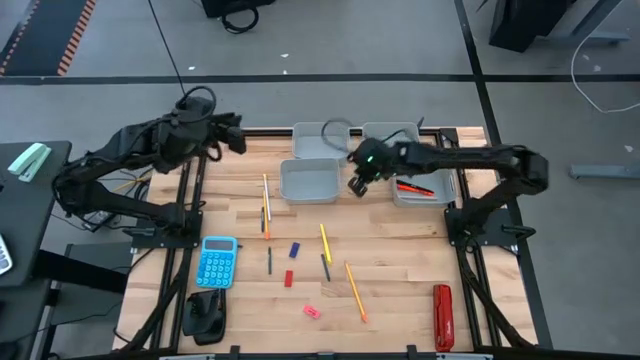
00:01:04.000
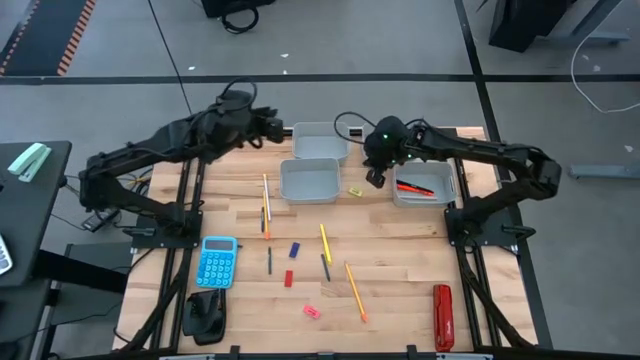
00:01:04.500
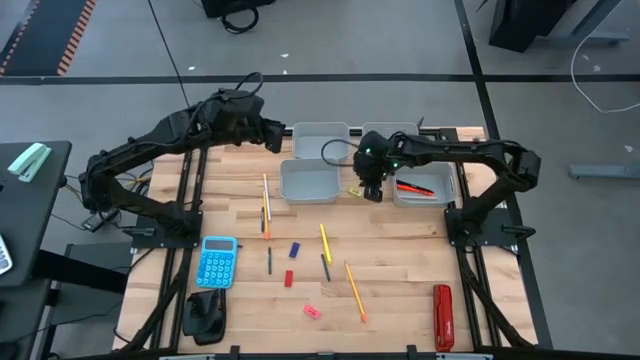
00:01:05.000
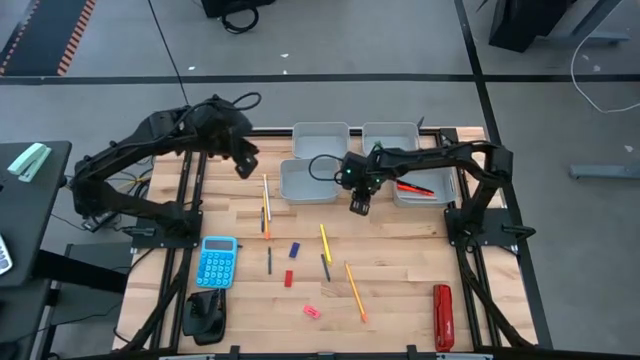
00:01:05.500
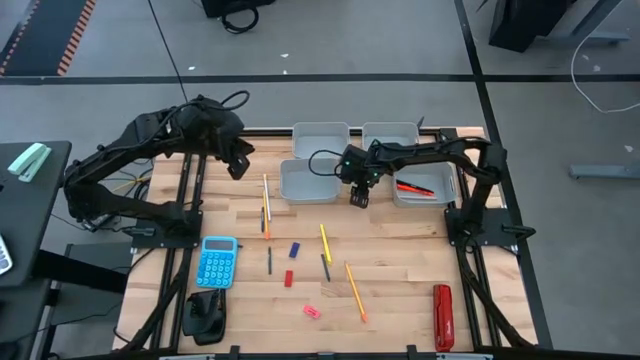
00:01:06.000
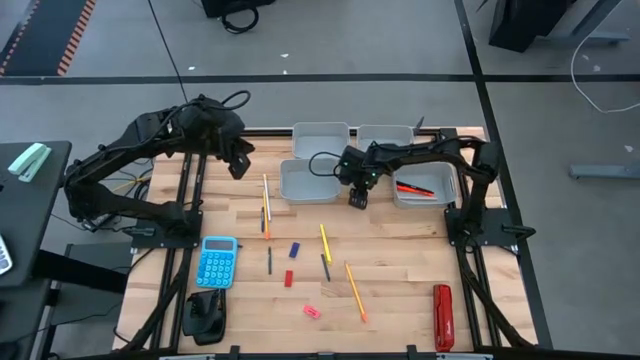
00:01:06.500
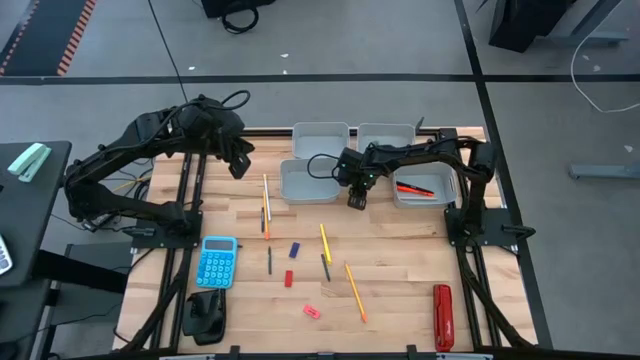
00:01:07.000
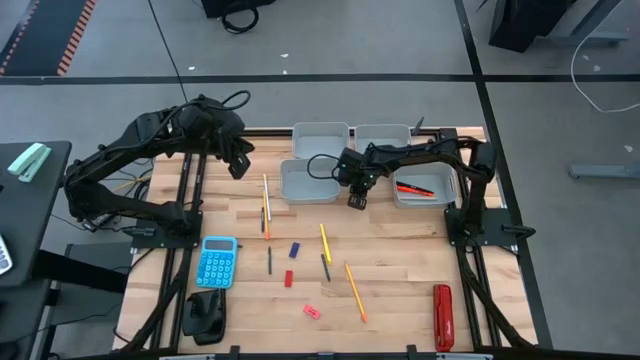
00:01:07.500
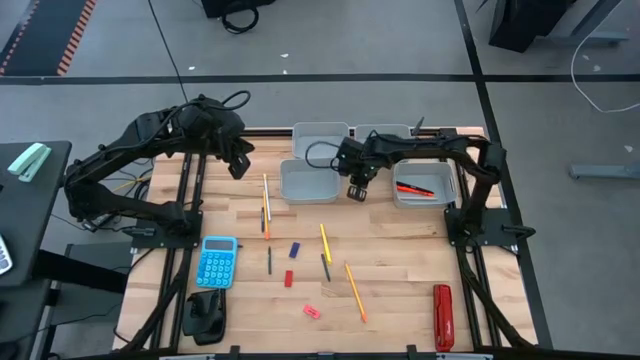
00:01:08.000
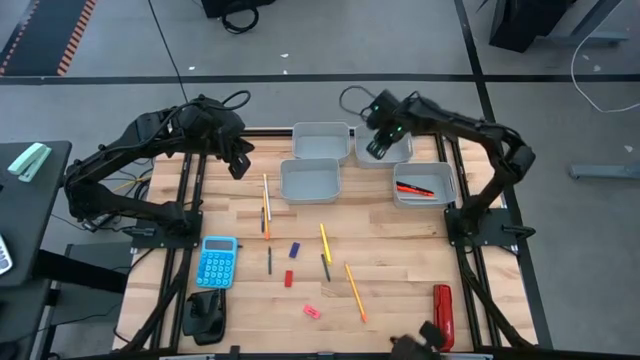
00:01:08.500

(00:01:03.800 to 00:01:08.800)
Task: Sort crayons/erasers/pens/pencils in bins
Put the yellow eraser into the top right gray bin

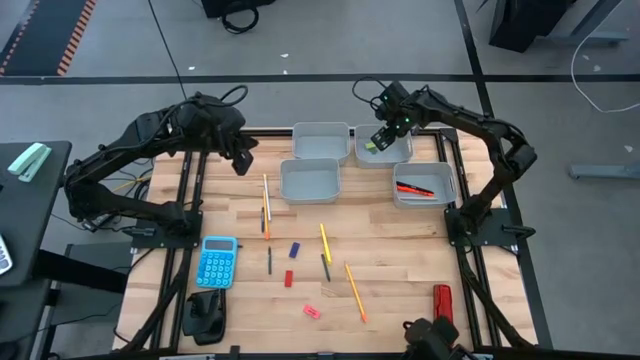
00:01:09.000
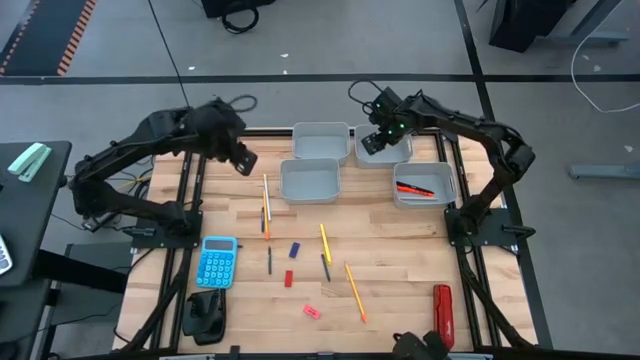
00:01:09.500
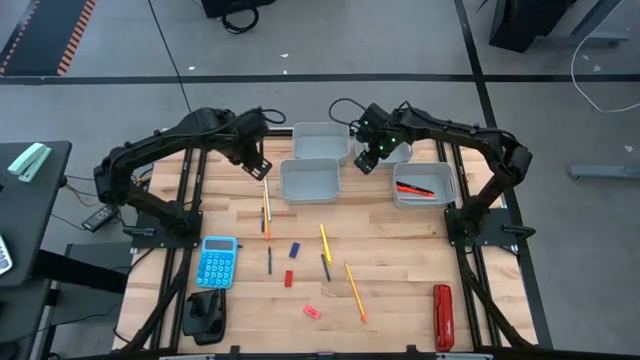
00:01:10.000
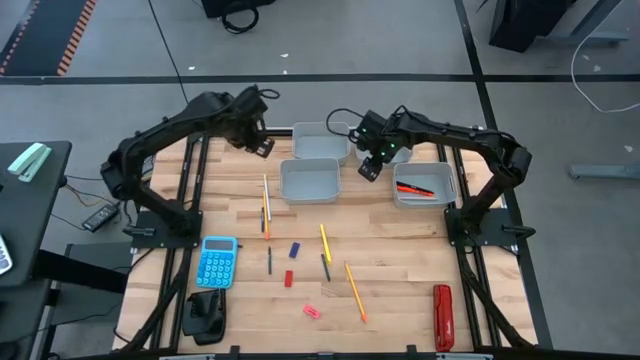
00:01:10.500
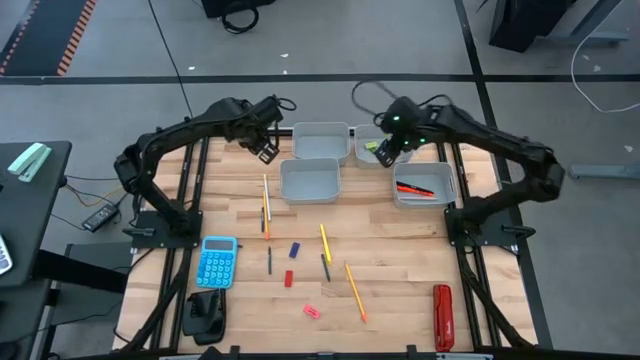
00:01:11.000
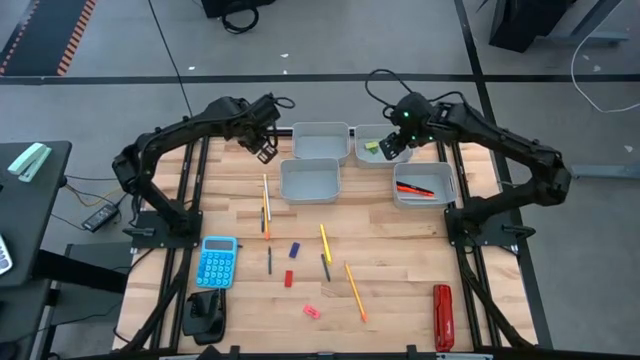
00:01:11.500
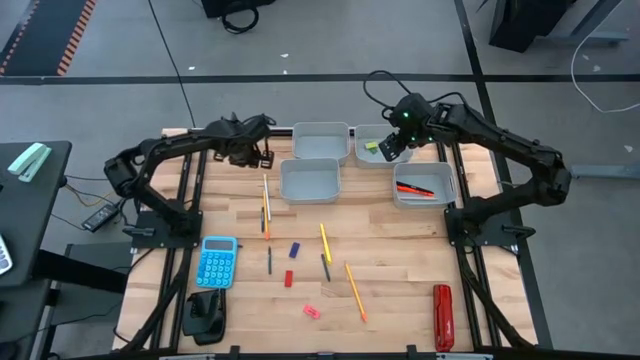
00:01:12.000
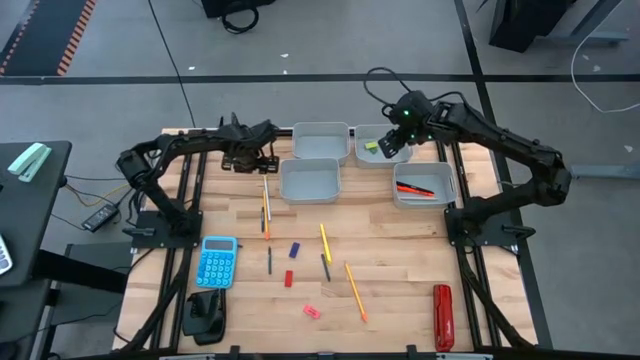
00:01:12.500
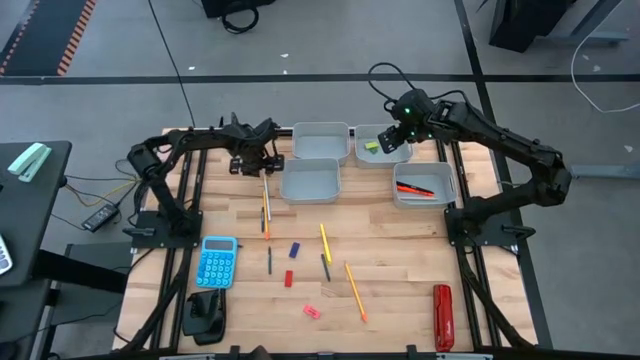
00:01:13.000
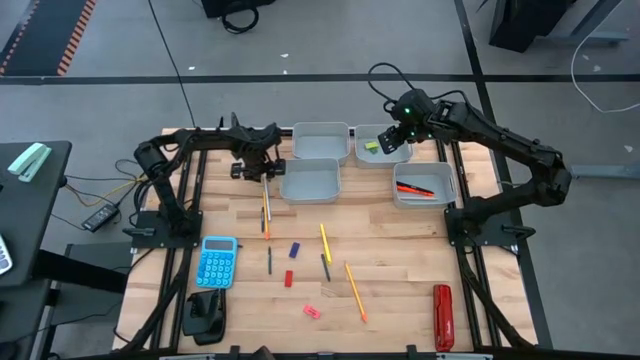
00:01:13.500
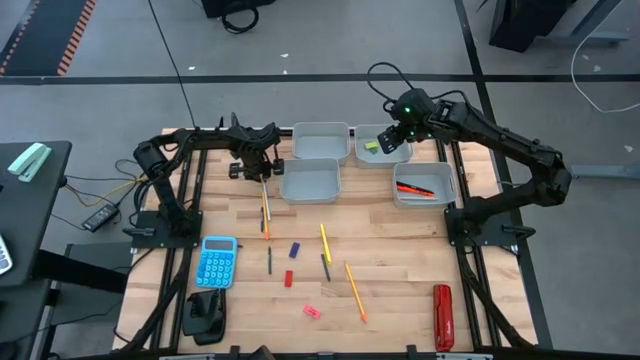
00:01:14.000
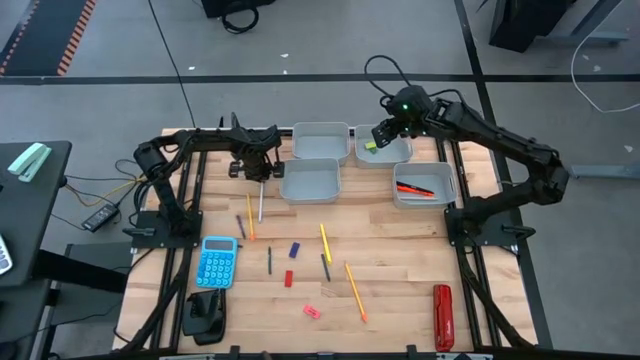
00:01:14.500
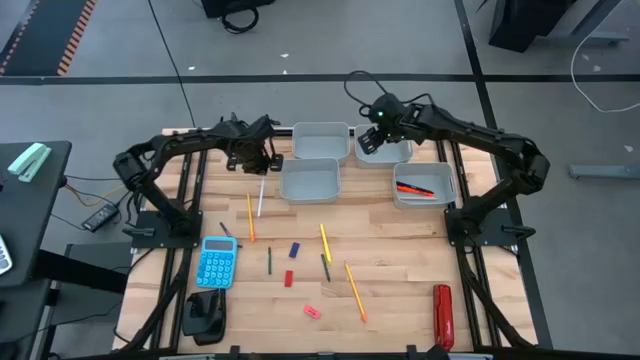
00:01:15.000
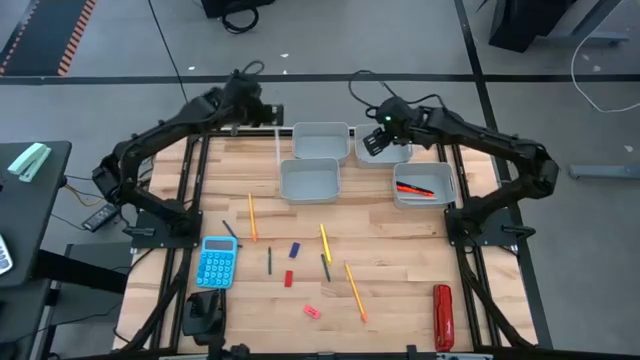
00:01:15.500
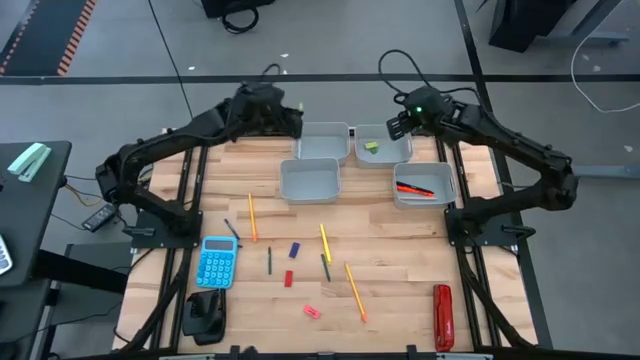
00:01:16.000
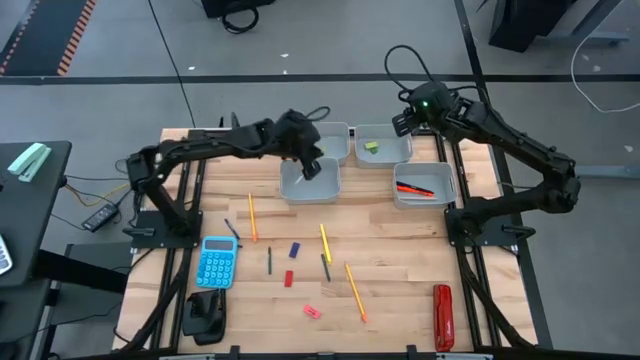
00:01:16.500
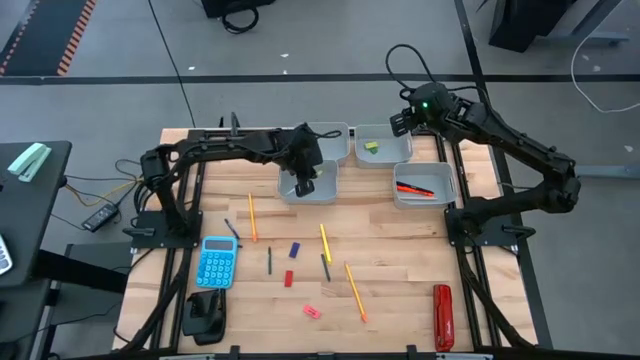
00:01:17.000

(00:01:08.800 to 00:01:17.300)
Put the white pencil into the bottom left gray bin

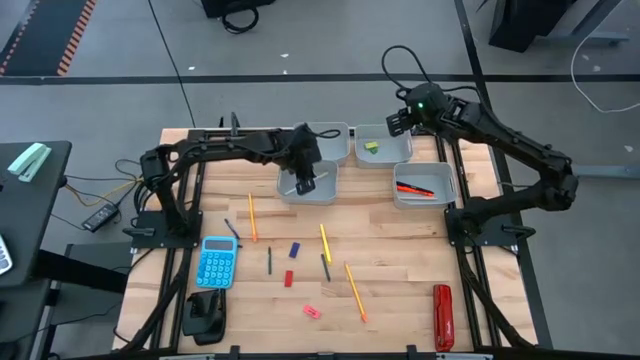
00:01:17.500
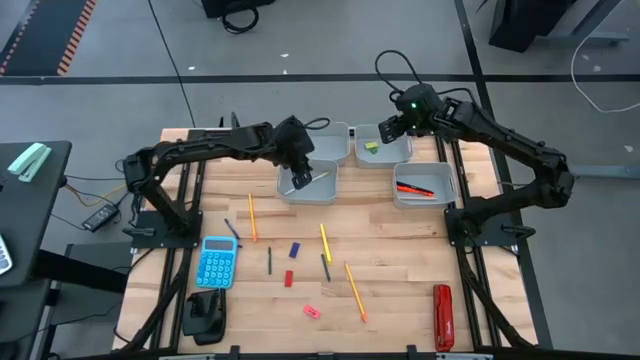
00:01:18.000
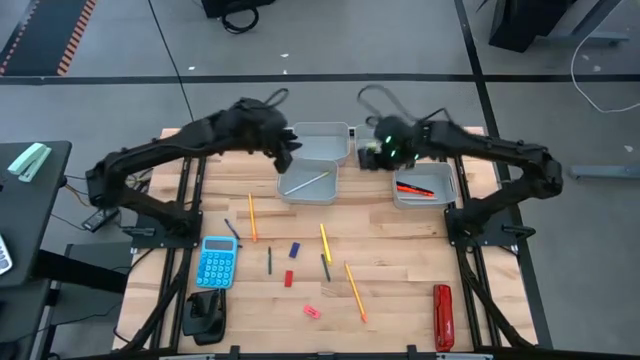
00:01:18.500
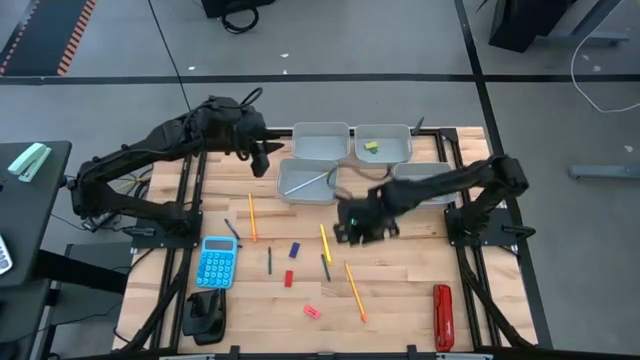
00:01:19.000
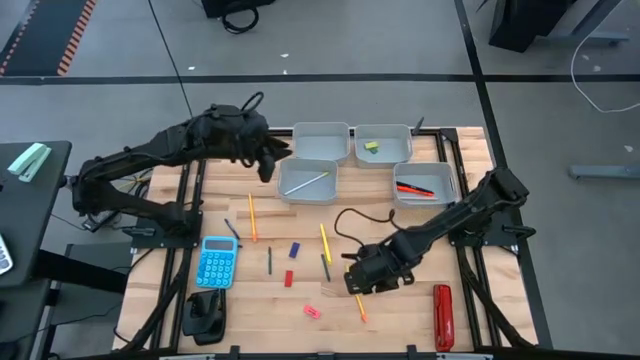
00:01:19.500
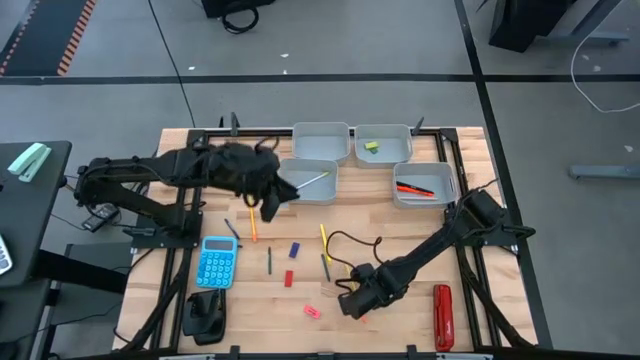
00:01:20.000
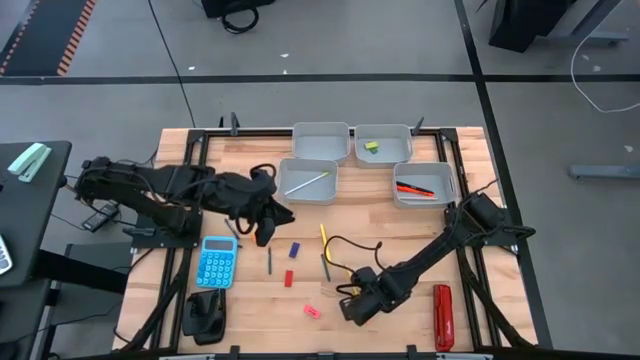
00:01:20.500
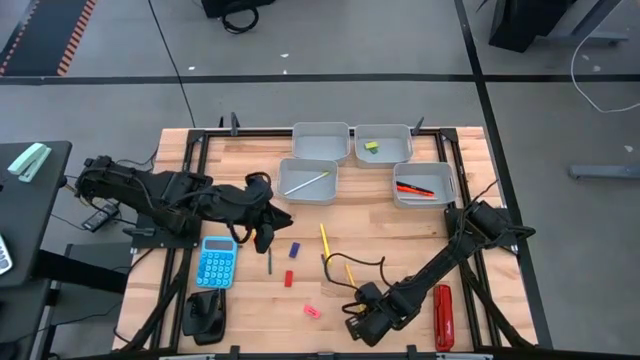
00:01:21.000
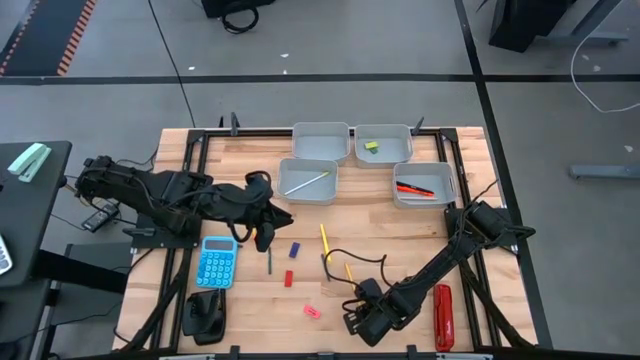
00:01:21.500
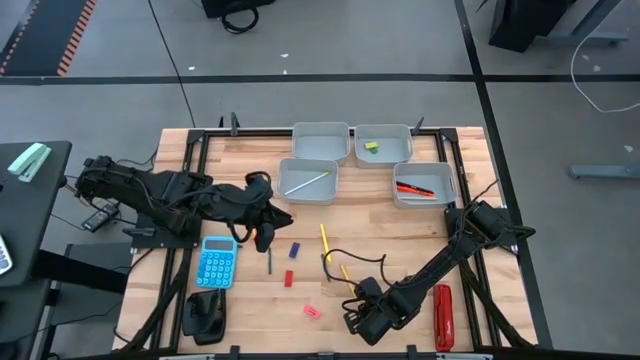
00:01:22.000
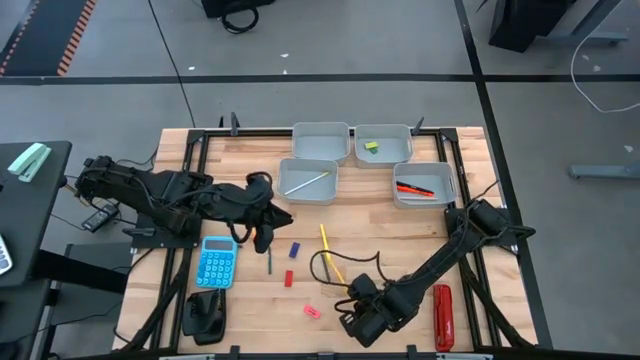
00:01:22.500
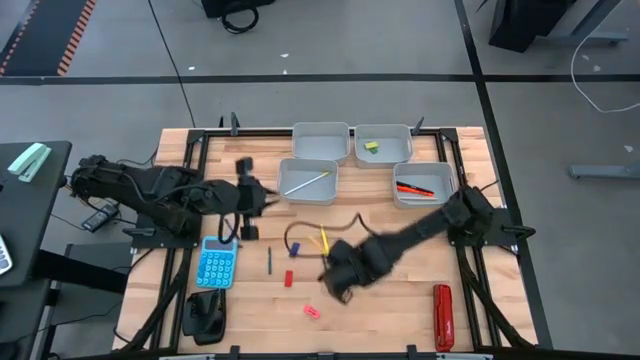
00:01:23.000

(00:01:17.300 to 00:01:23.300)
Put the bottom yellow pencil into the bottom left gray bin
